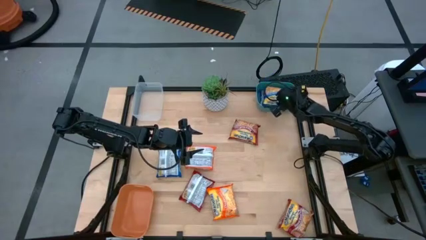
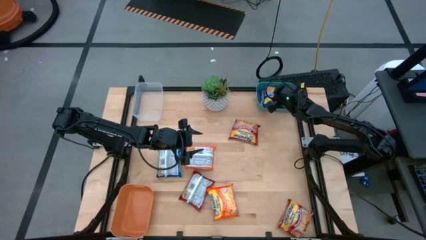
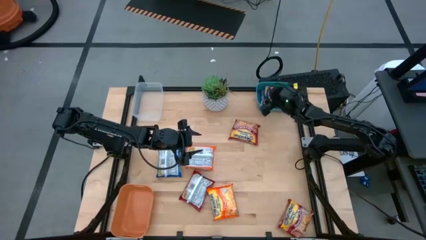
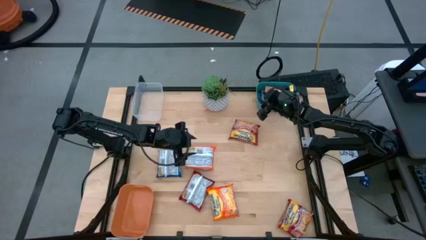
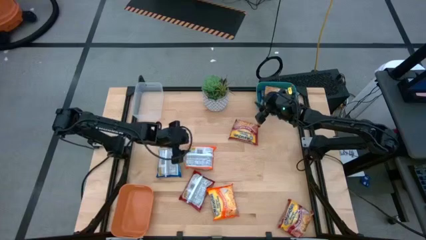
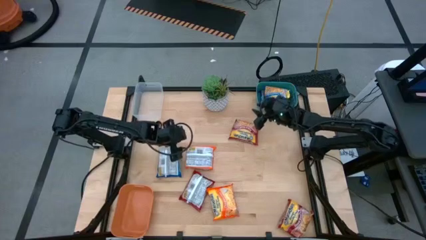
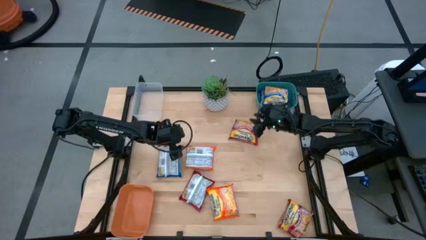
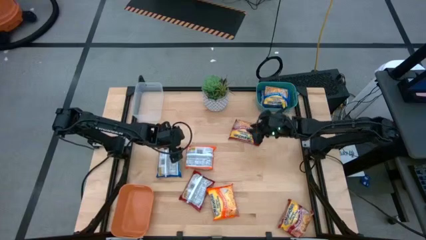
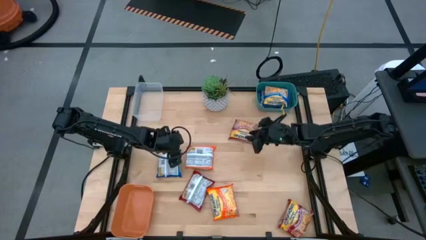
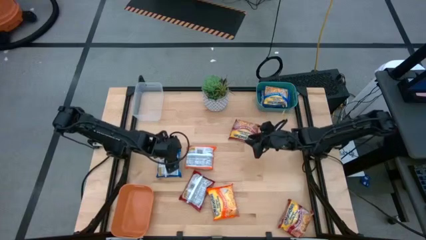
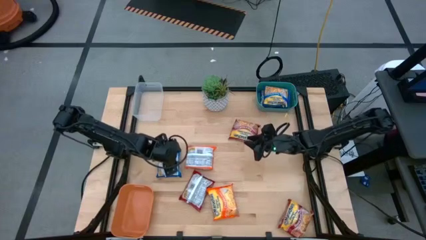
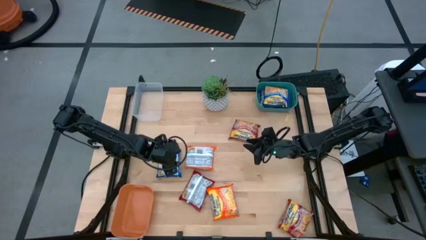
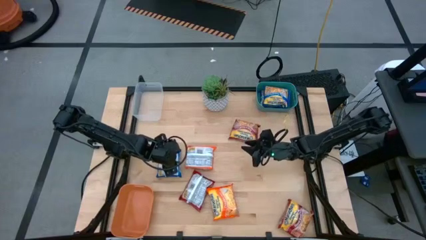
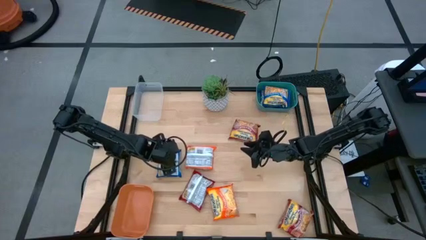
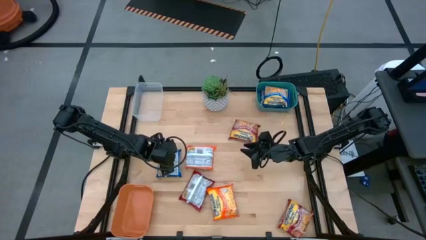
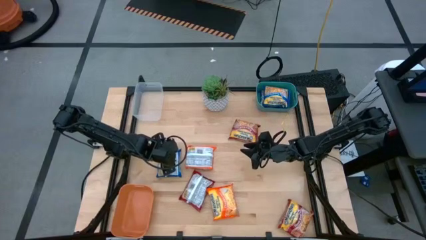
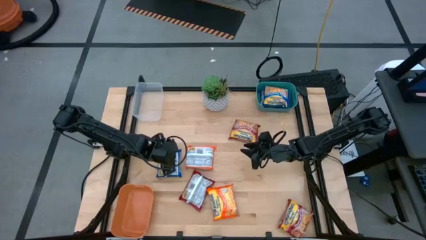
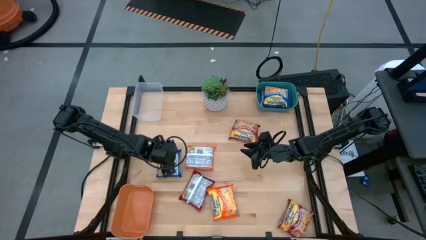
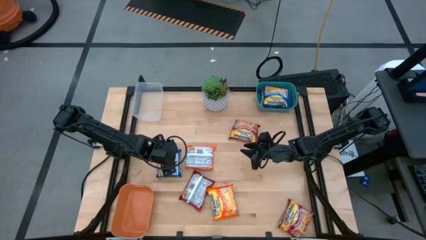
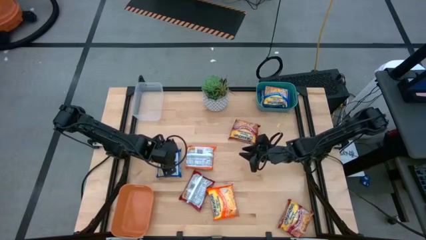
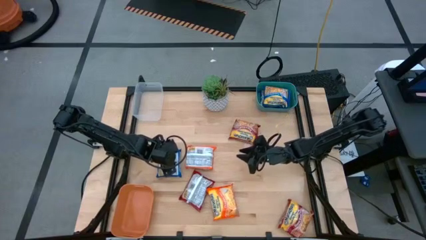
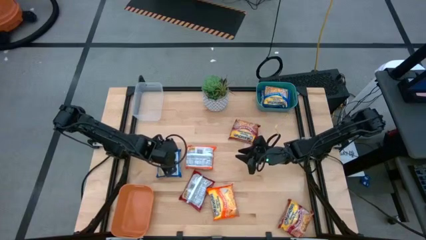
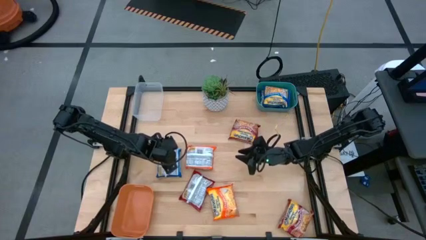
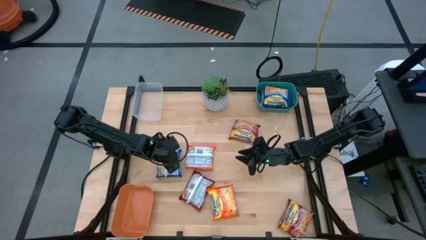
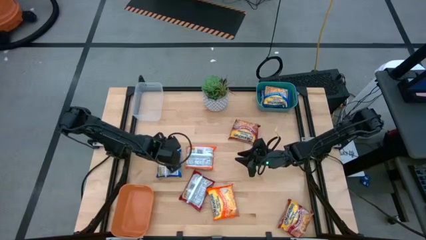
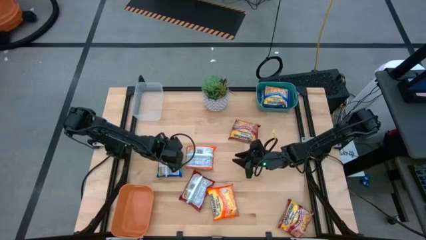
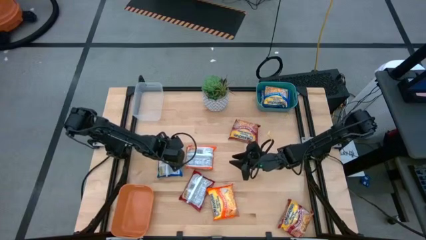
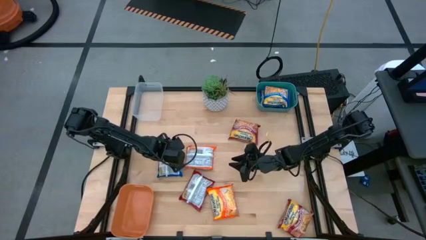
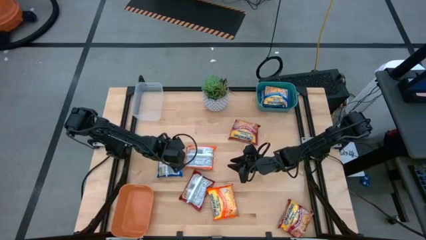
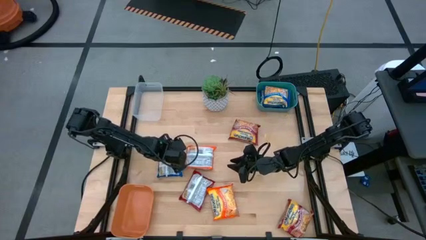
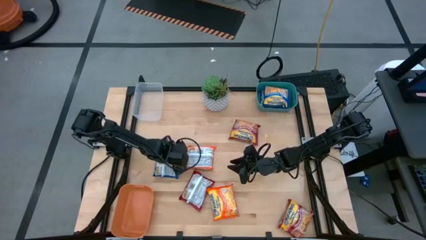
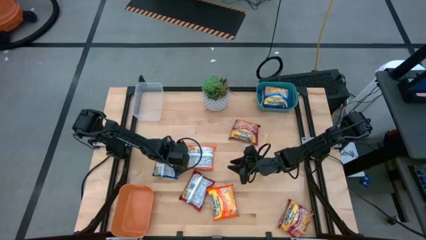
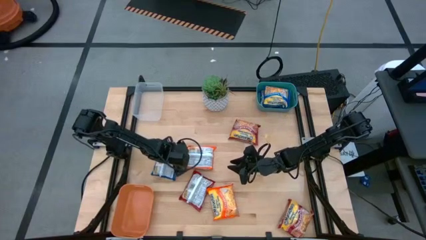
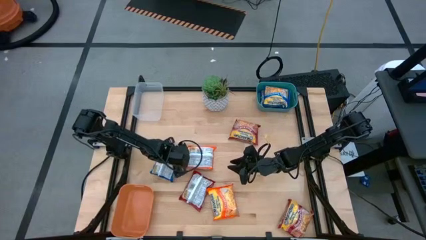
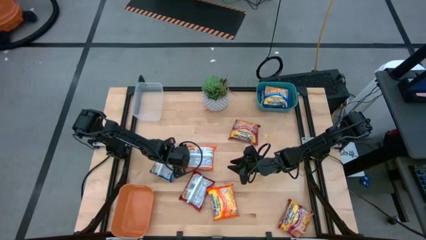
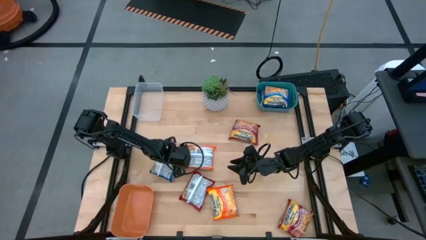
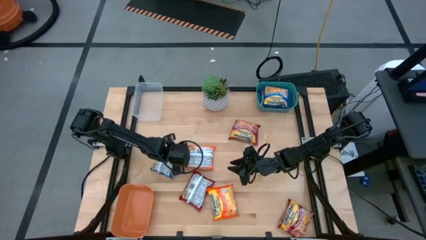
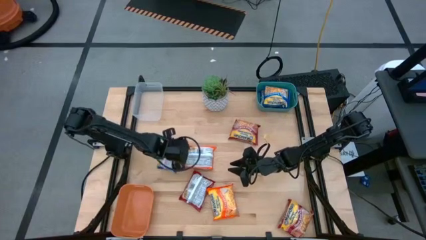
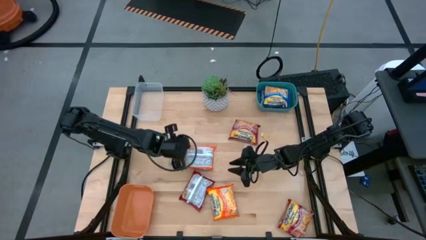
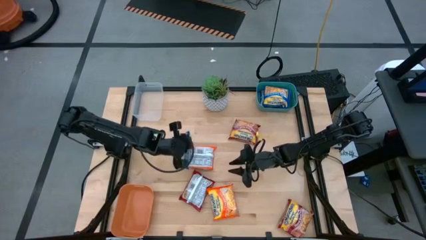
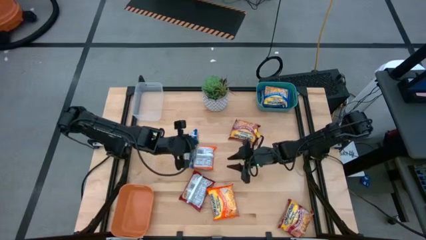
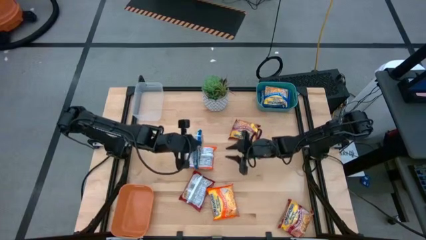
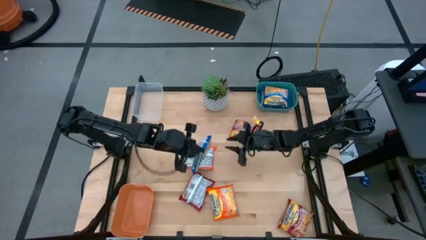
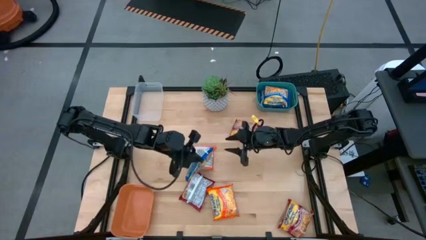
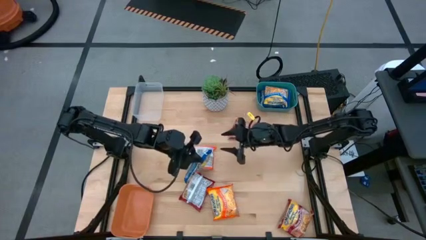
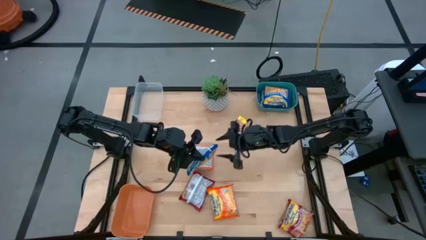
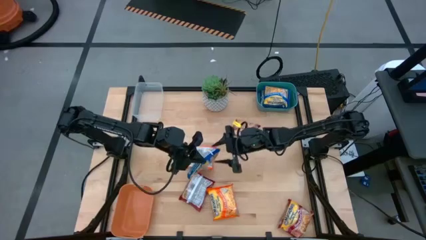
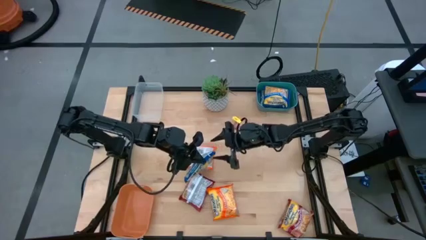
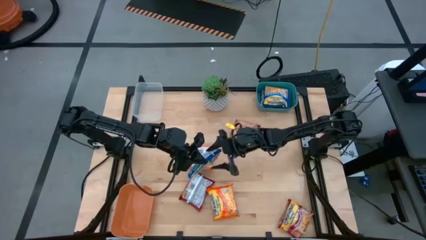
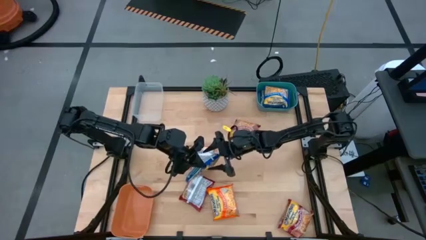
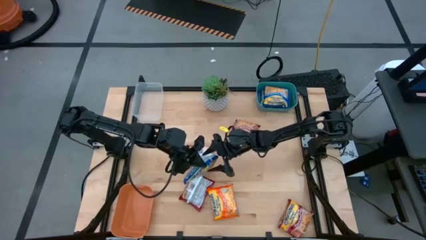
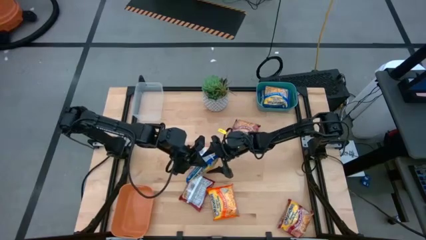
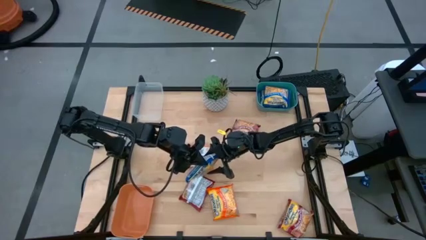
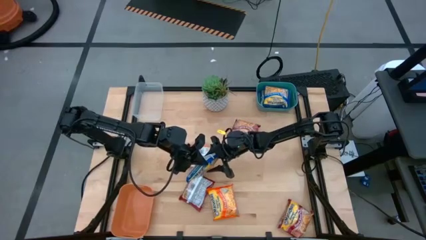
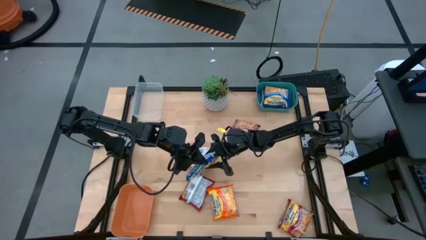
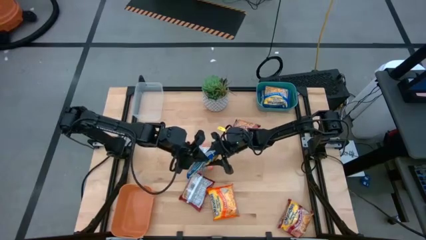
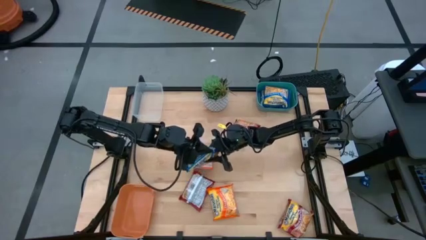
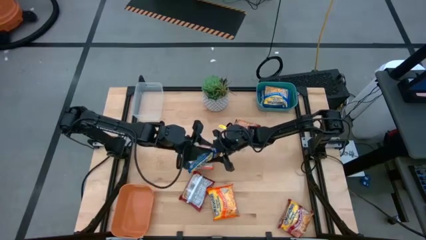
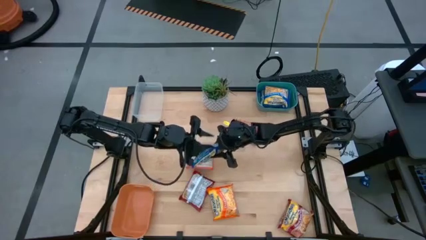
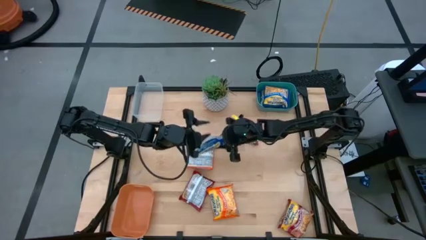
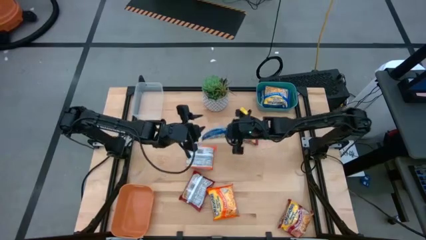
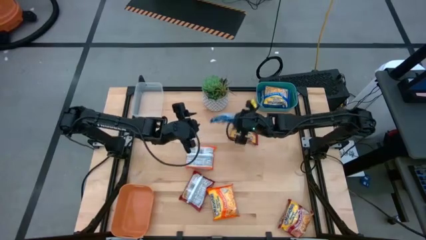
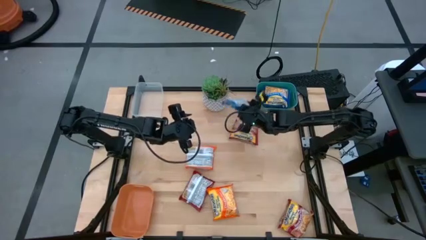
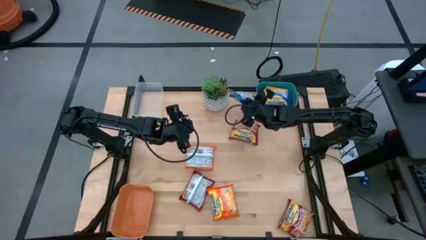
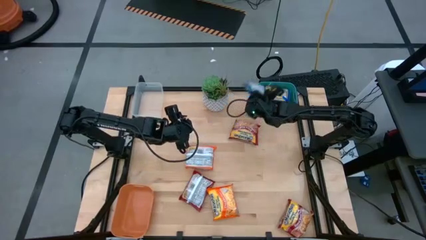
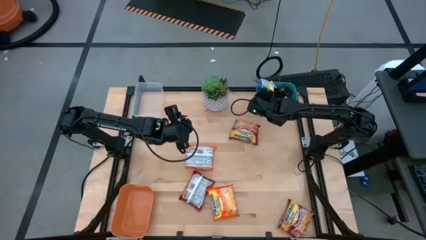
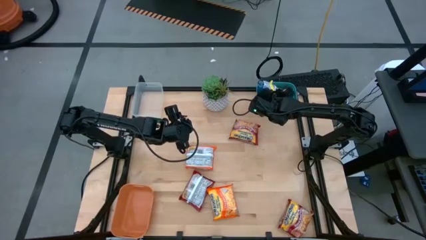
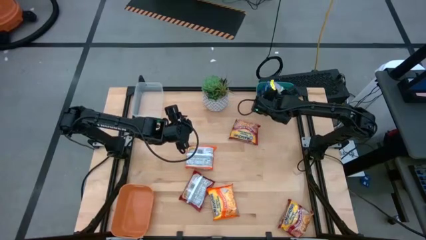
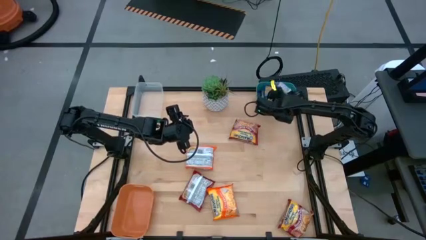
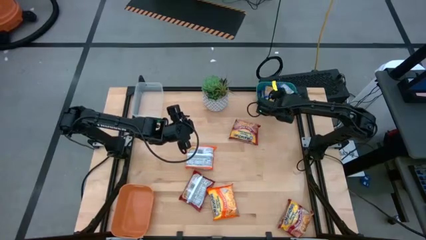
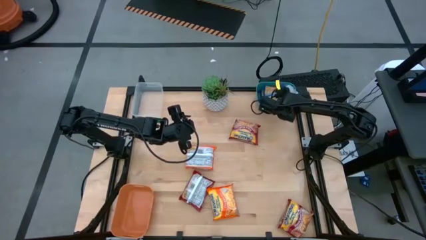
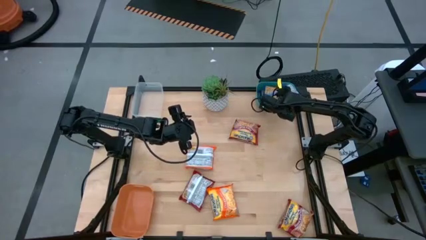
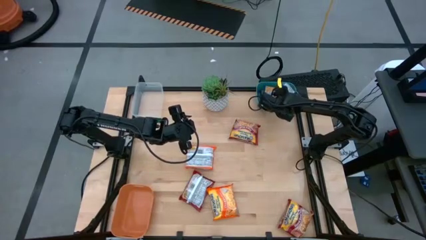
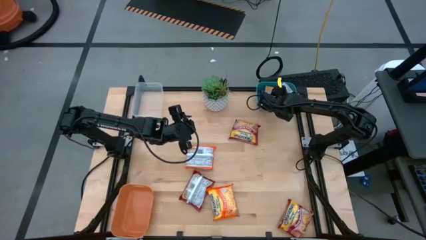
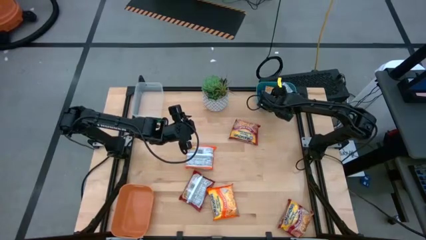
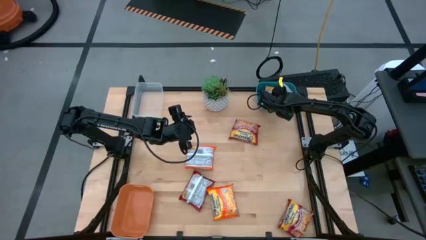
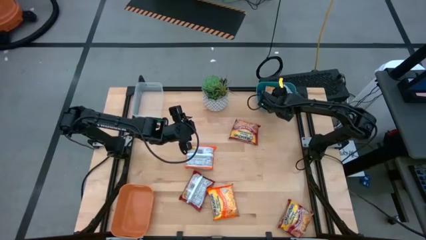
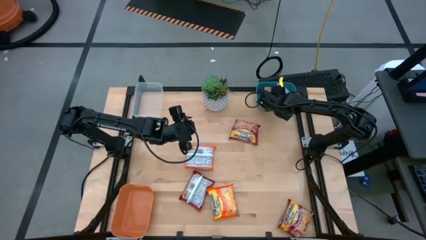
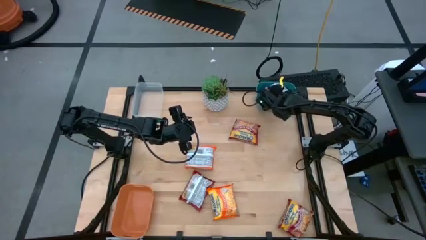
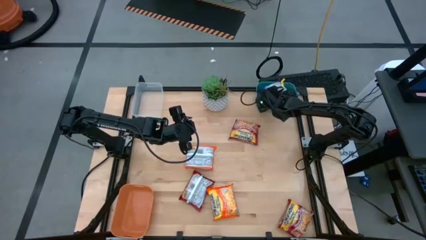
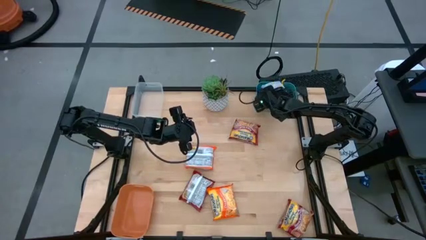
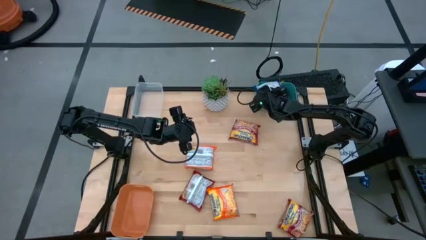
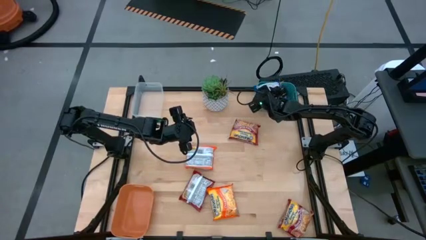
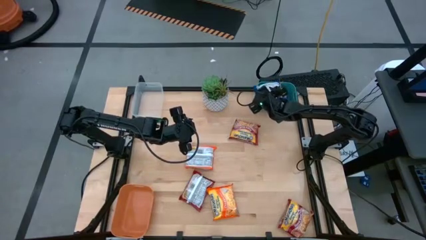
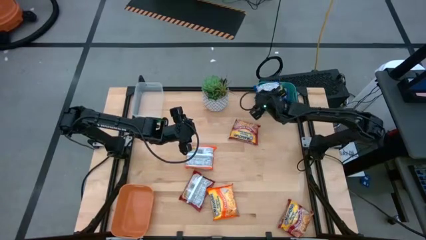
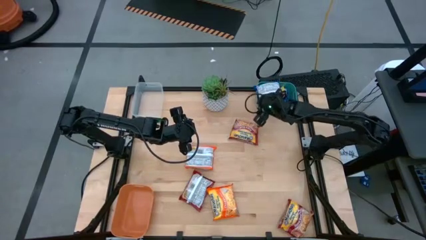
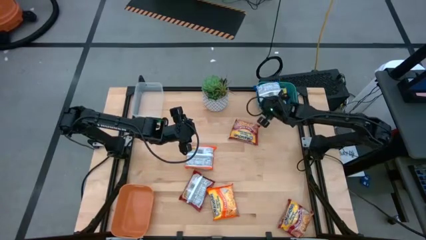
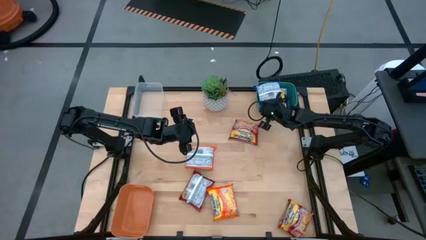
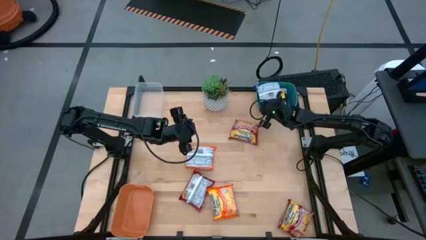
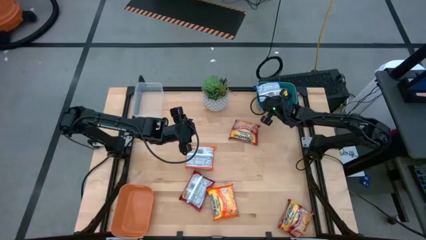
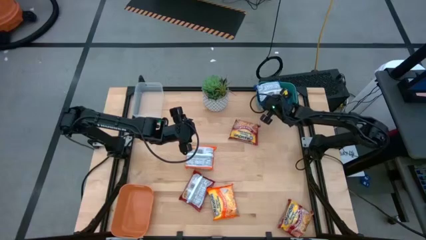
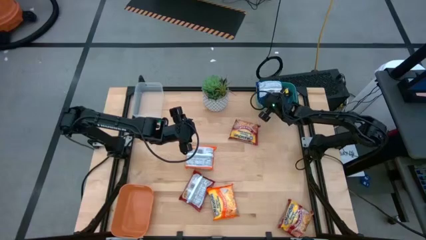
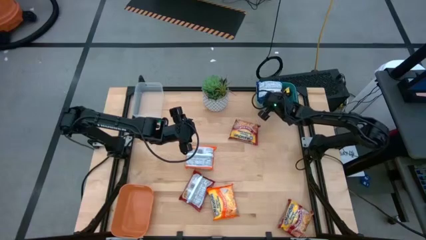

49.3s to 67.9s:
Task: Sort Maruchan noodles
Put the blue noodle pack into the green bin
